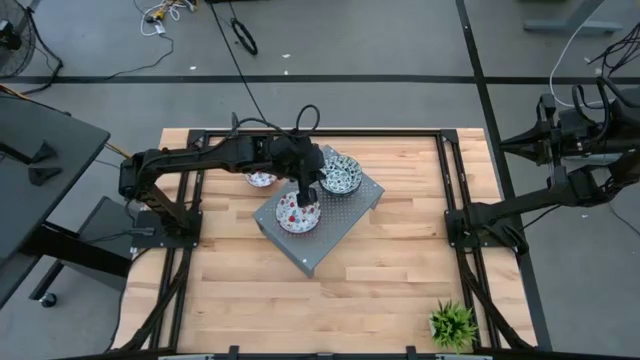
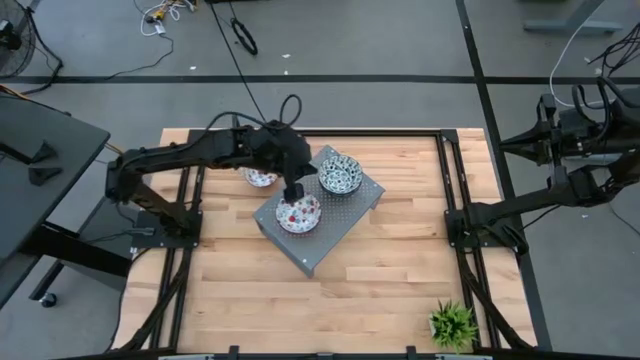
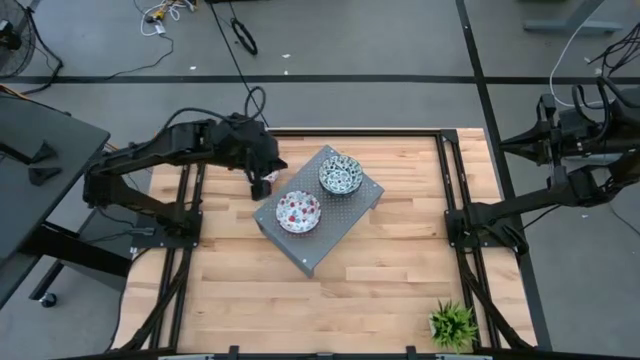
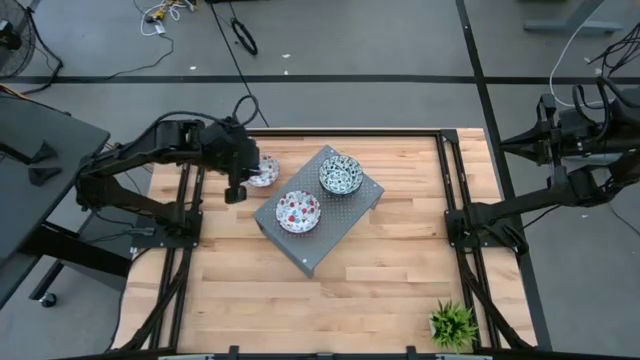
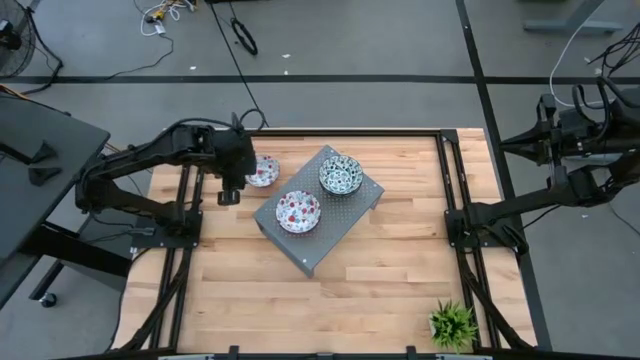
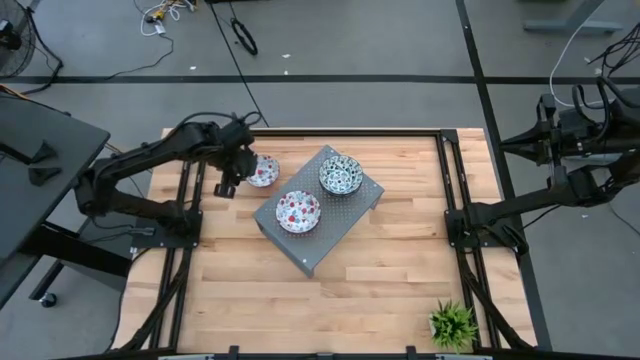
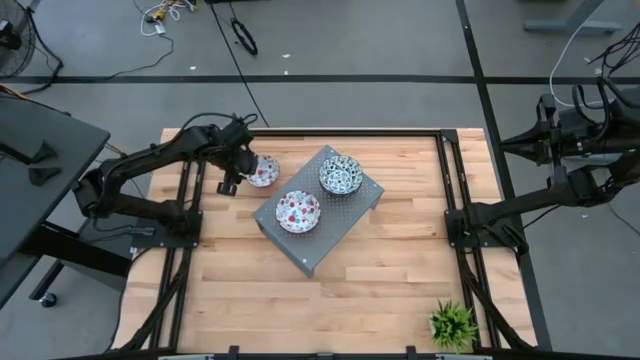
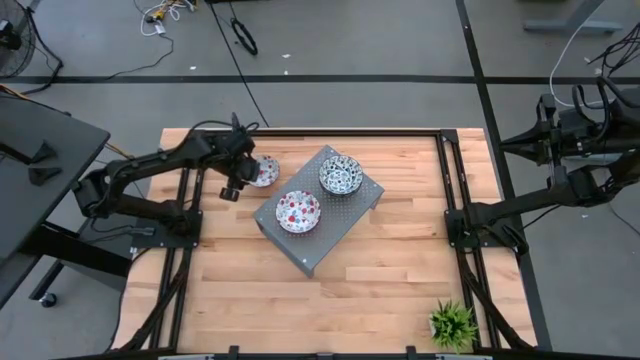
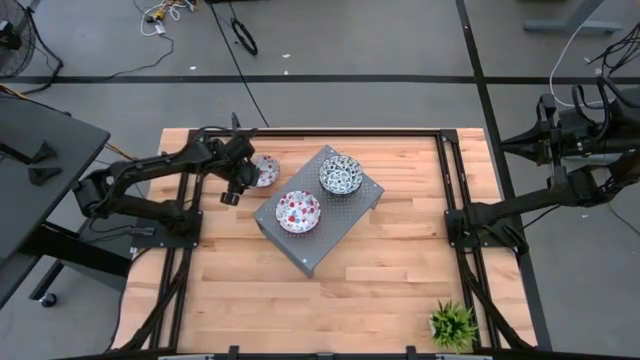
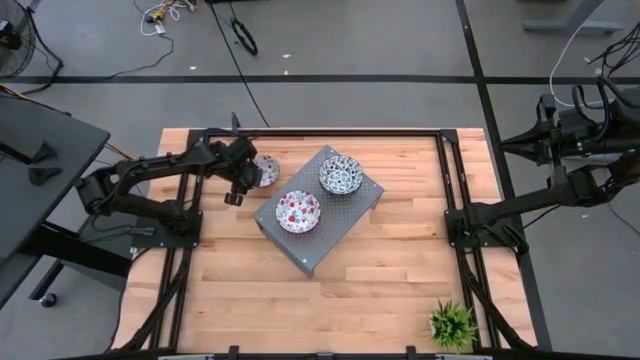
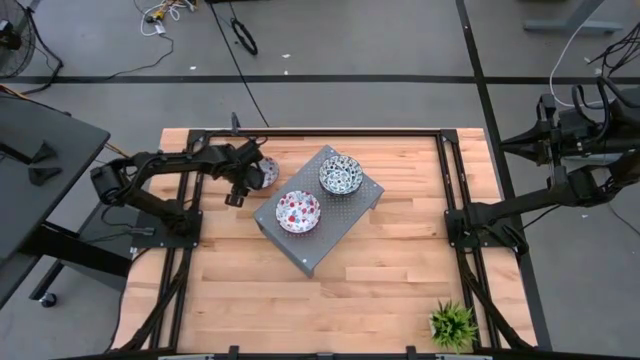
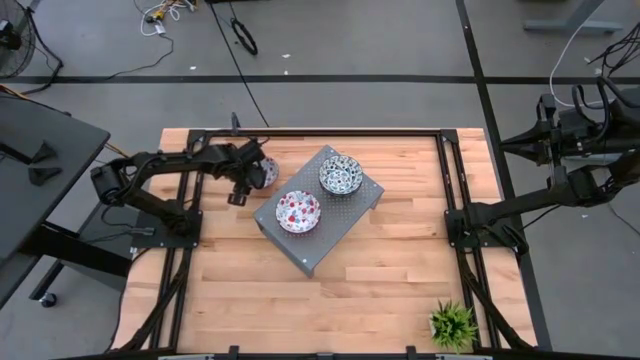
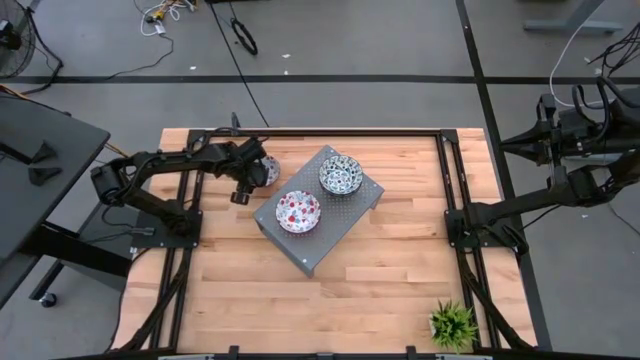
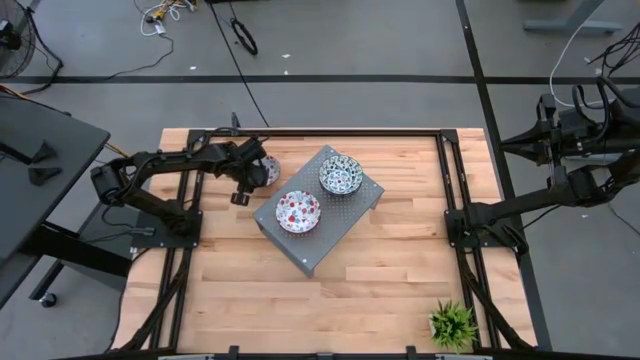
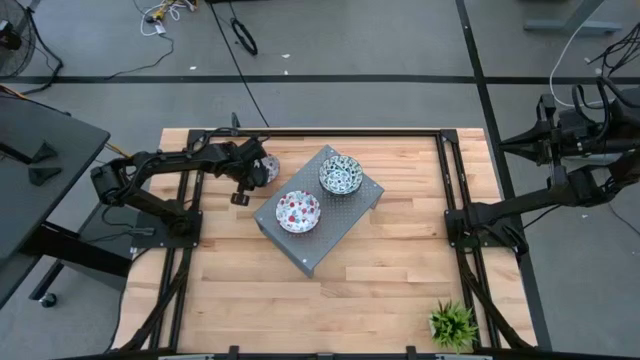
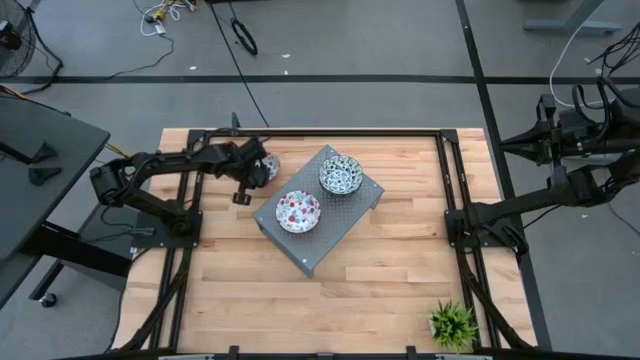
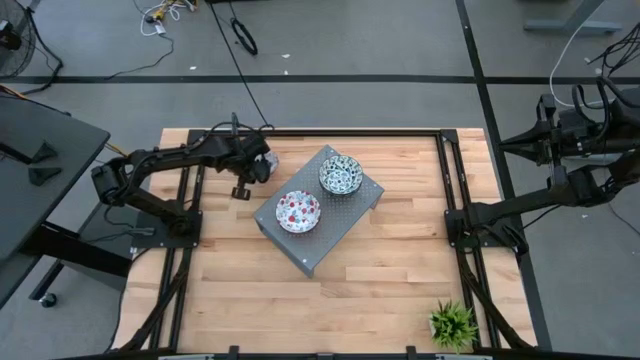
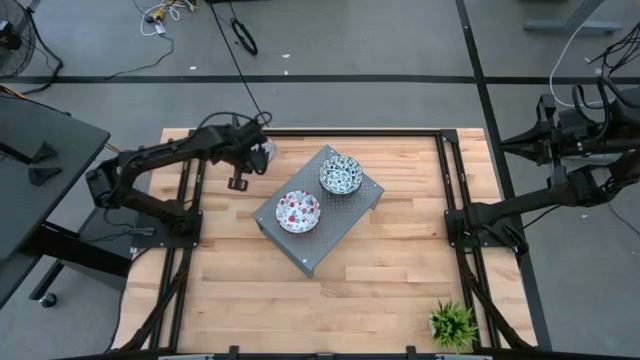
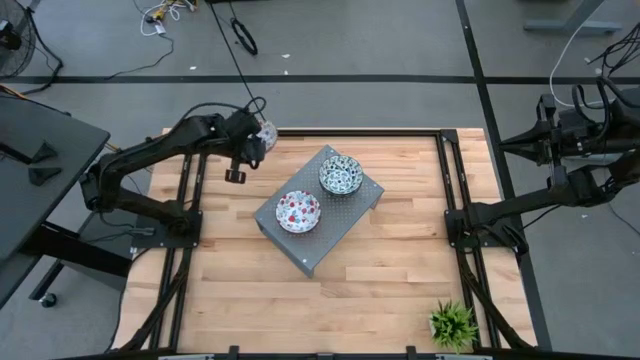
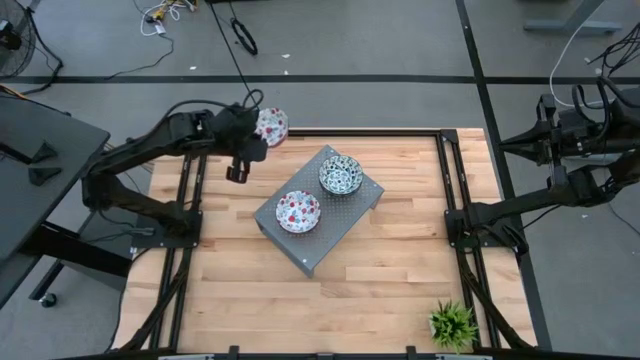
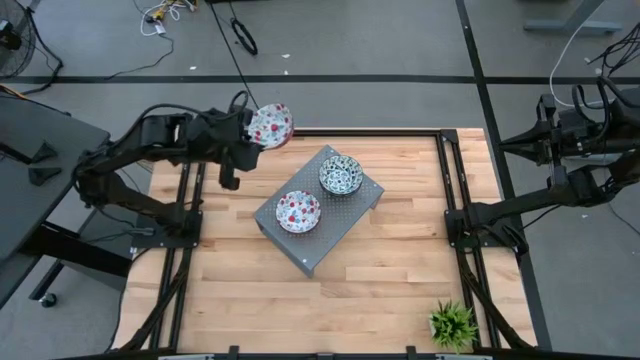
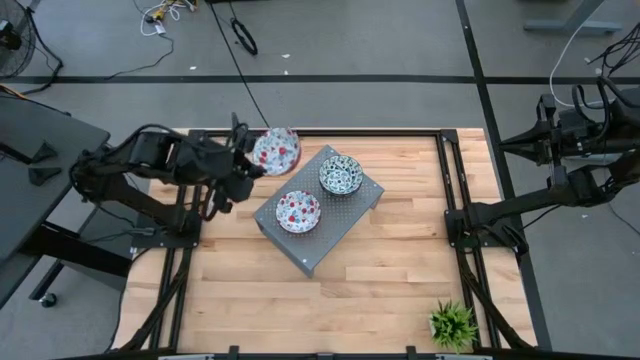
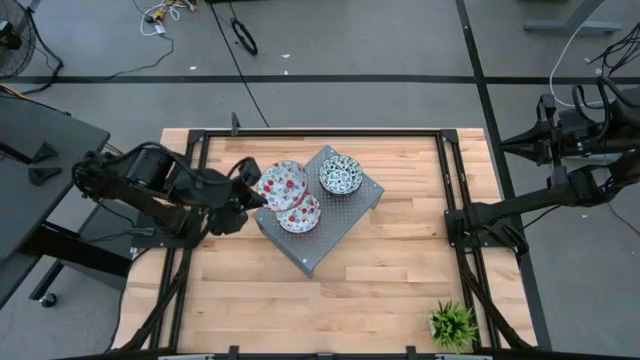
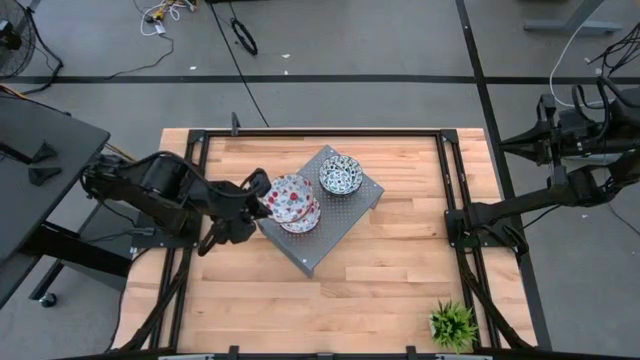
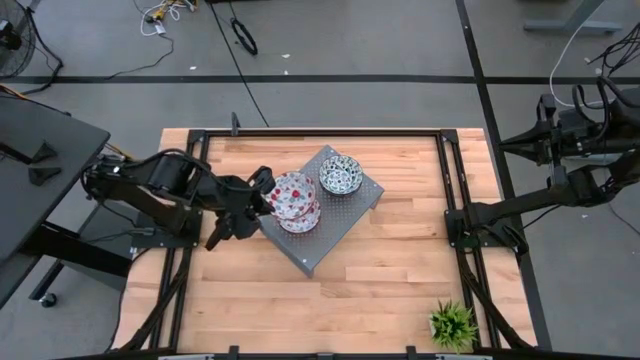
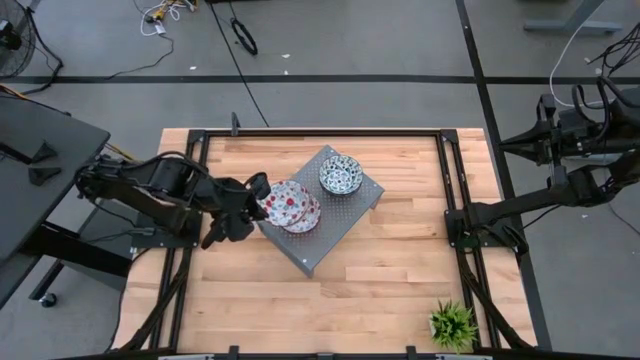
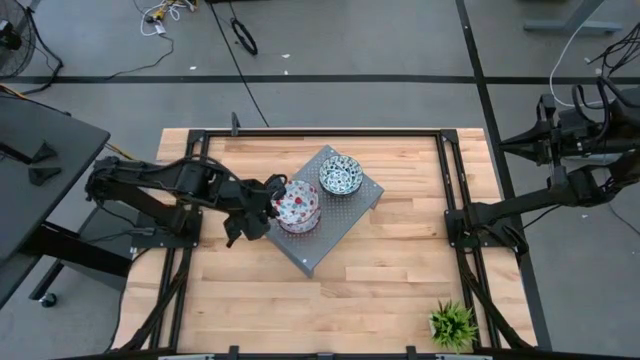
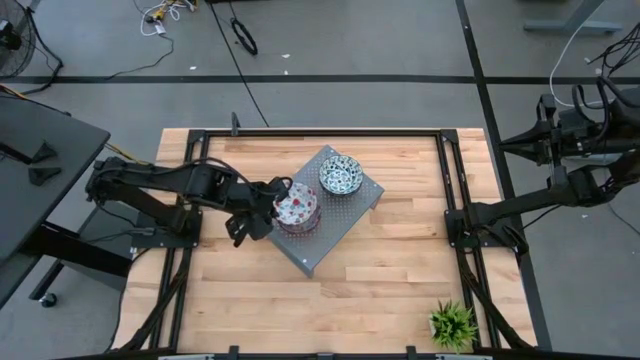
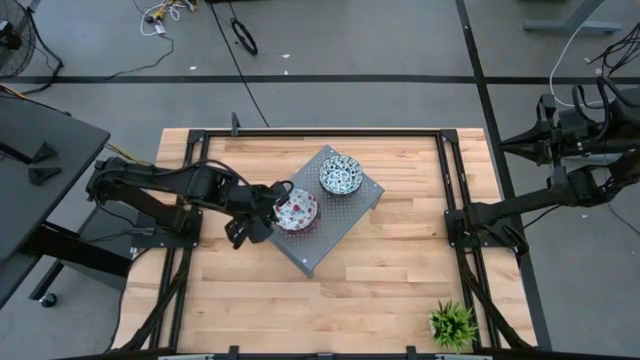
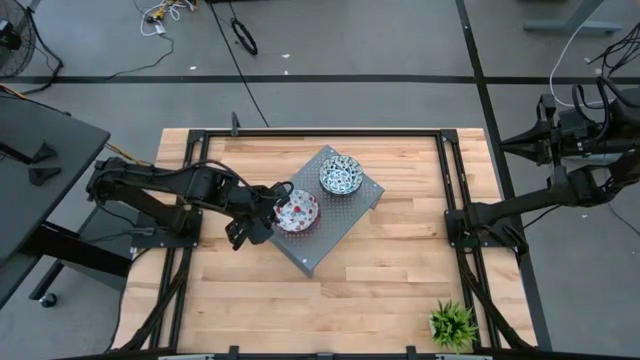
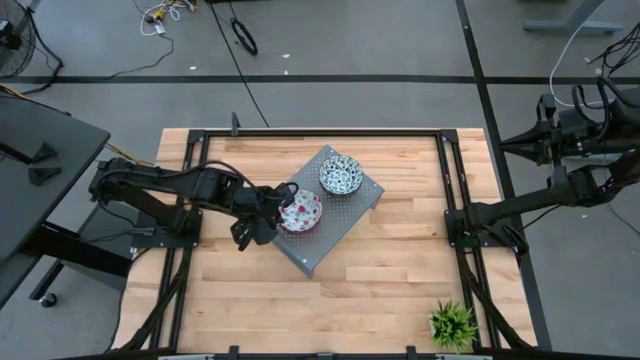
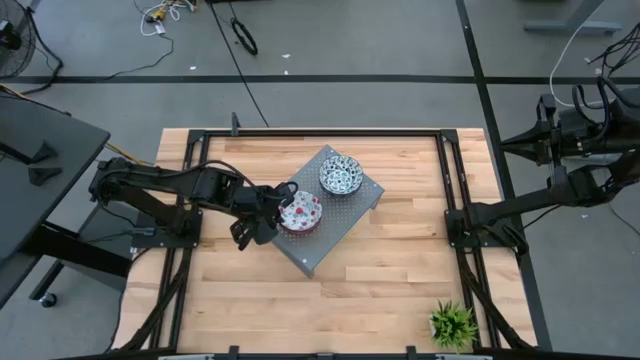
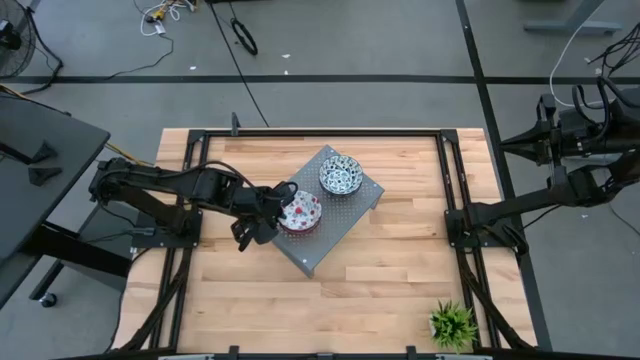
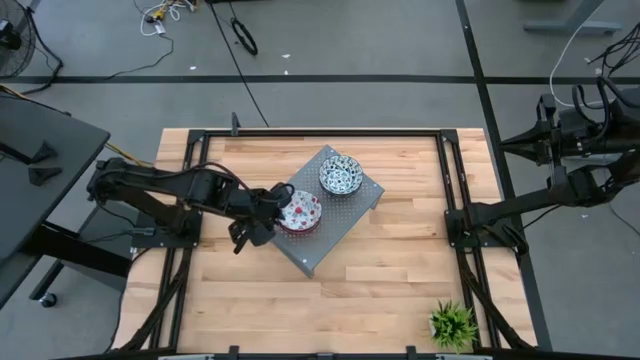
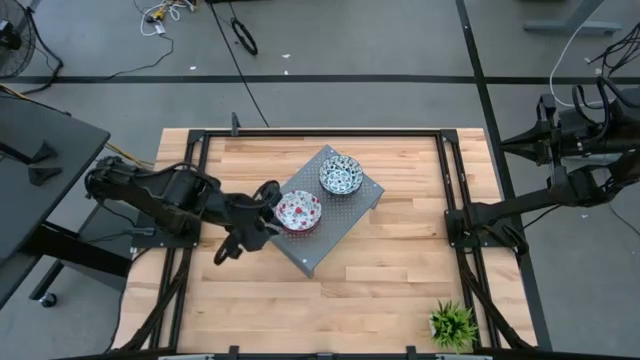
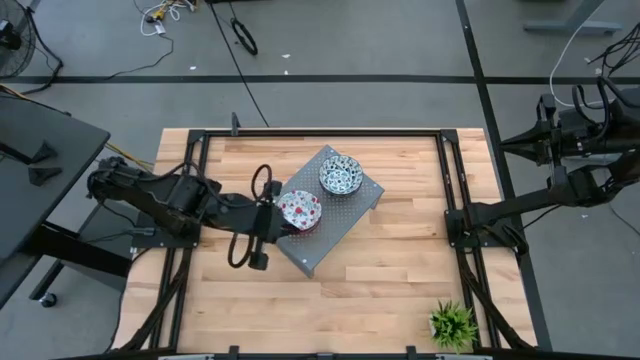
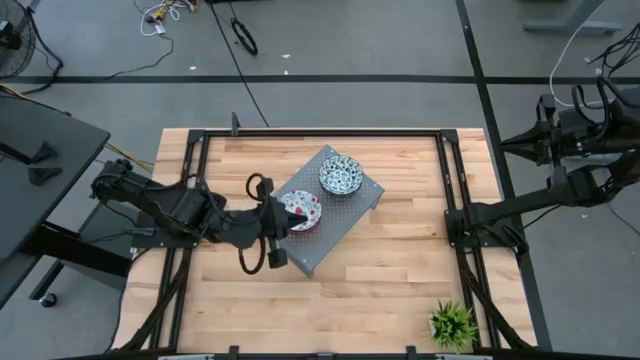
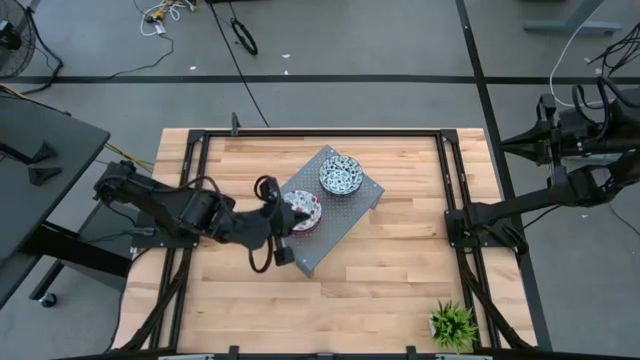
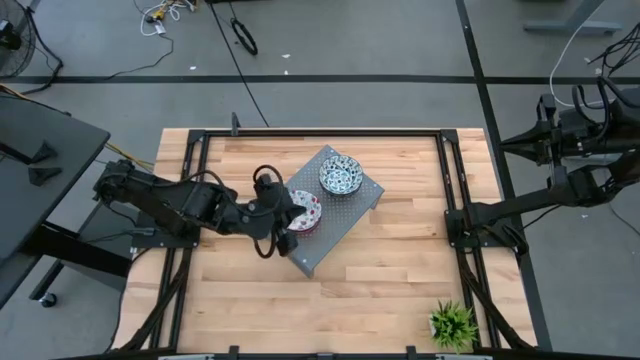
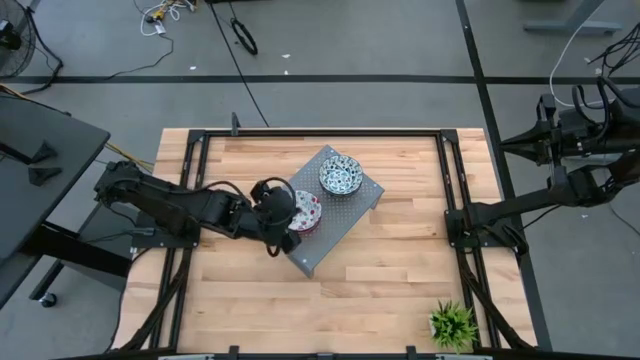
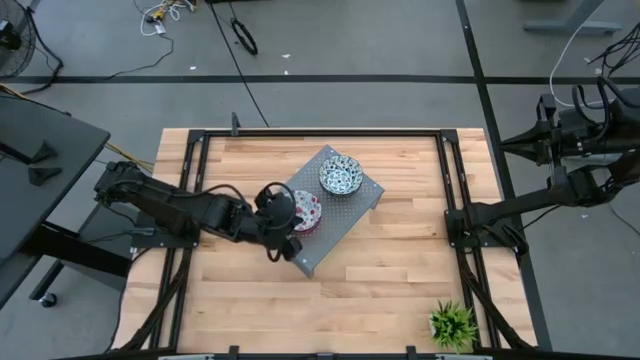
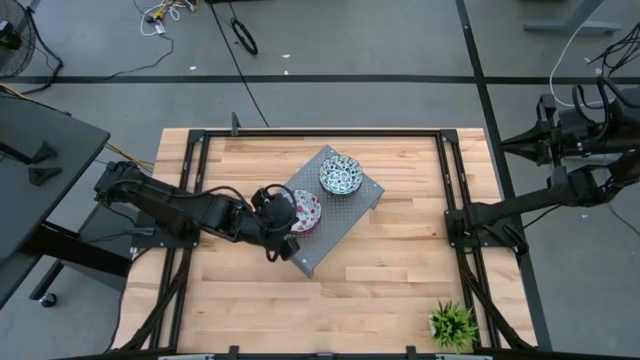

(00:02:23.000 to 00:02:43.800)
Task: Pick & Place Mini bowls
Stack the red patterned bowl on top of the red patterned bowls on the shelf

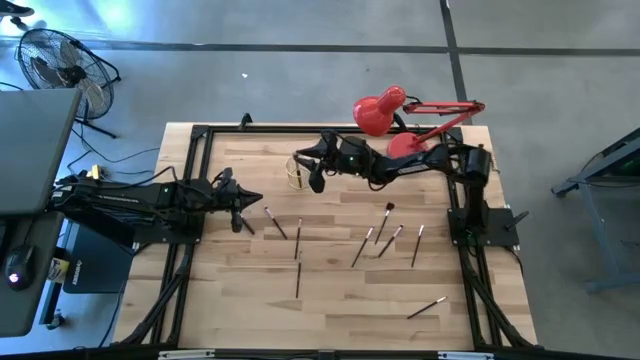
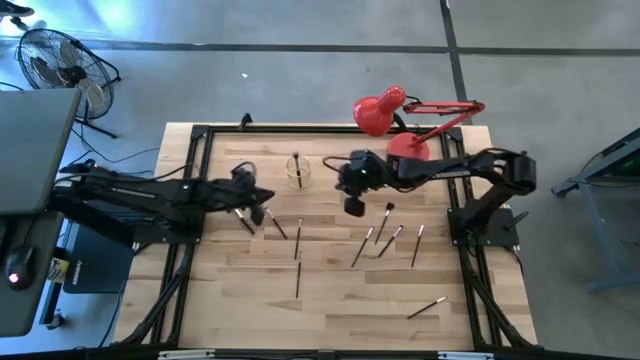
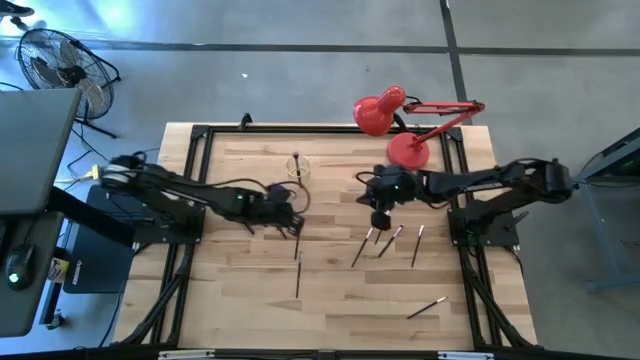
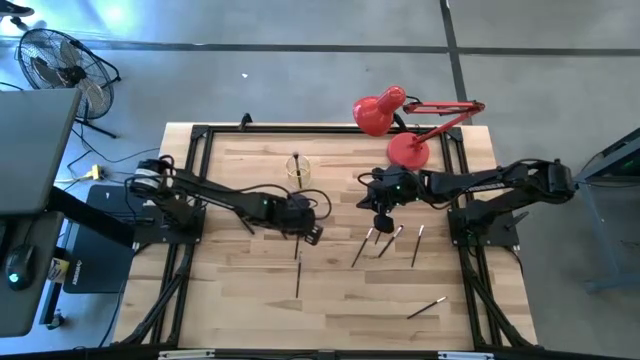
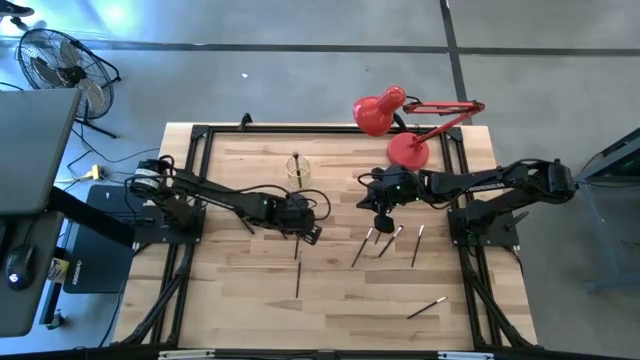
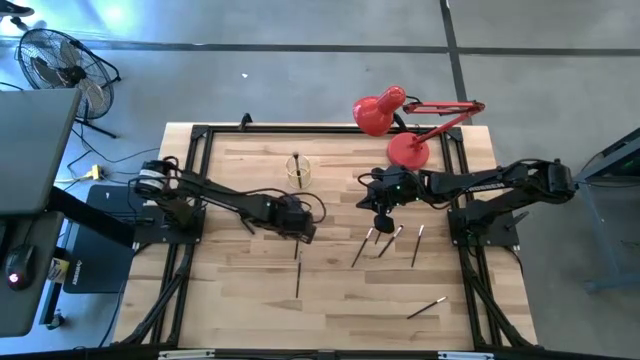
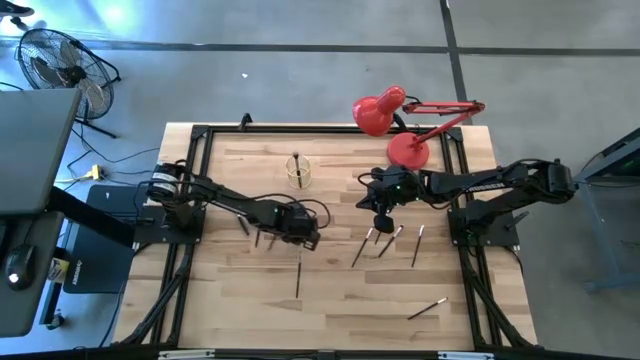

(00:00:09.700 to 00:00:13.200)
Task: Put items in baskets/containers
Put the top eyeliner brush into the wire organizer
